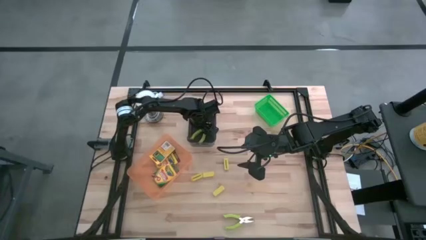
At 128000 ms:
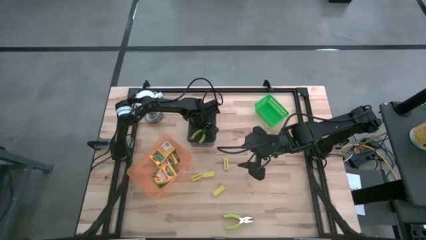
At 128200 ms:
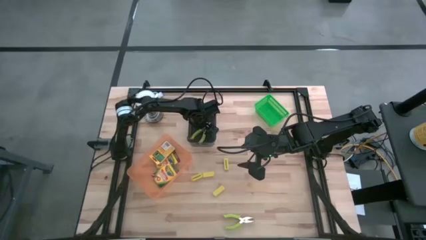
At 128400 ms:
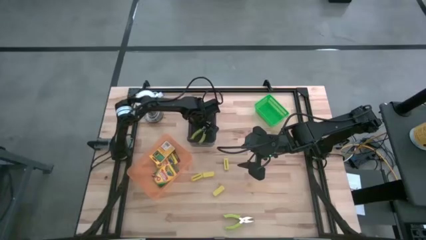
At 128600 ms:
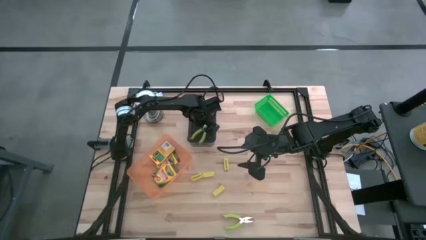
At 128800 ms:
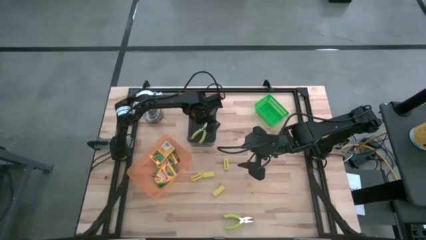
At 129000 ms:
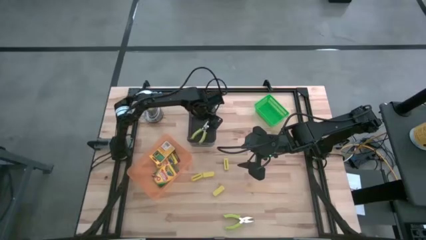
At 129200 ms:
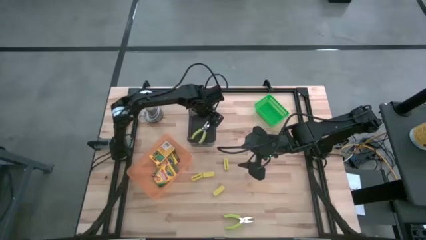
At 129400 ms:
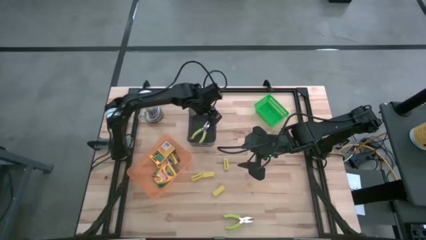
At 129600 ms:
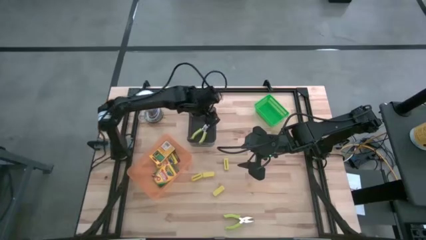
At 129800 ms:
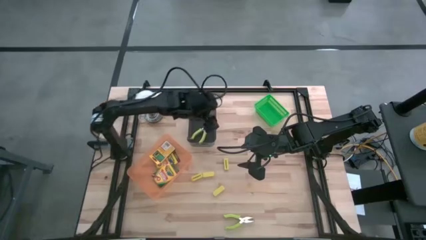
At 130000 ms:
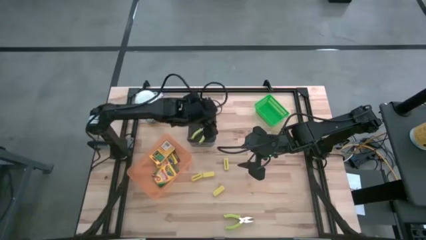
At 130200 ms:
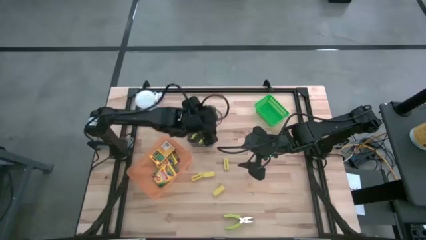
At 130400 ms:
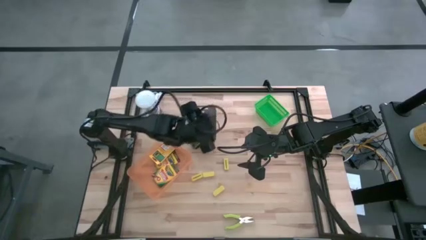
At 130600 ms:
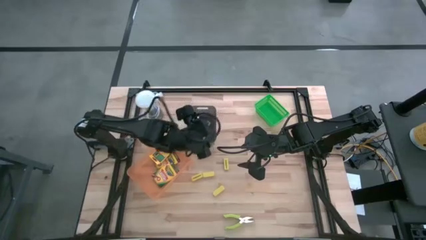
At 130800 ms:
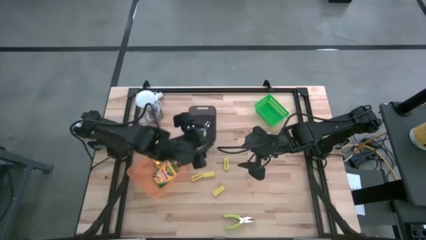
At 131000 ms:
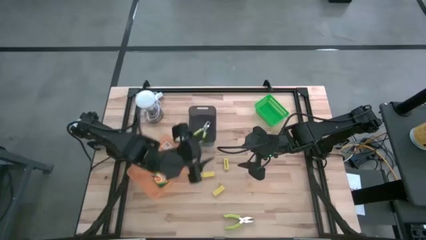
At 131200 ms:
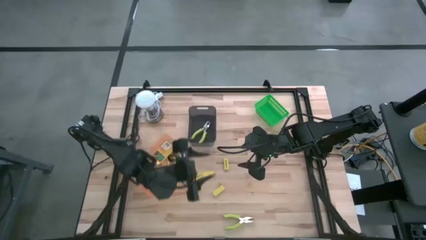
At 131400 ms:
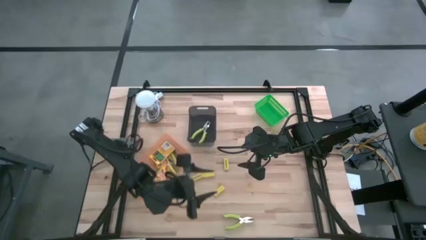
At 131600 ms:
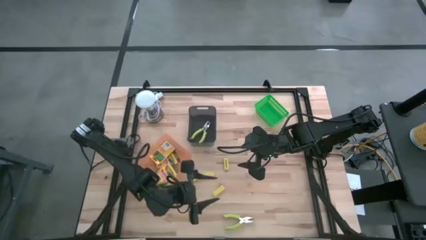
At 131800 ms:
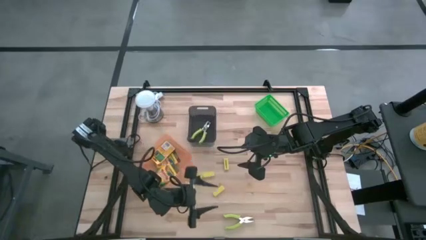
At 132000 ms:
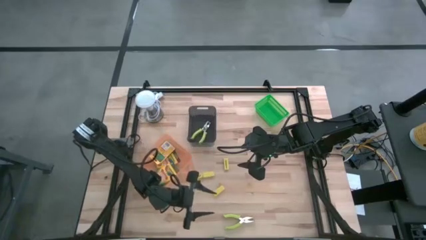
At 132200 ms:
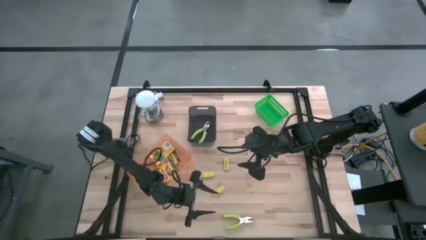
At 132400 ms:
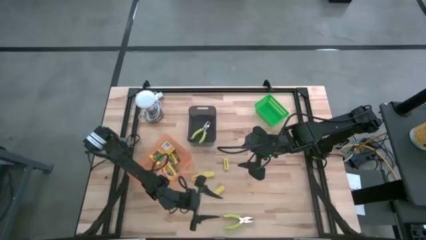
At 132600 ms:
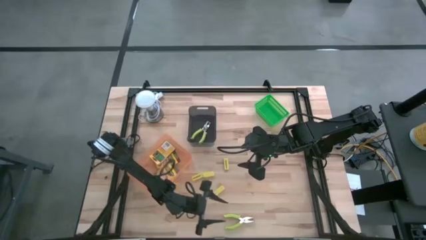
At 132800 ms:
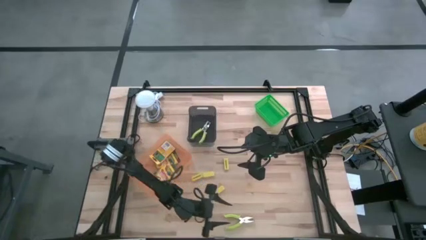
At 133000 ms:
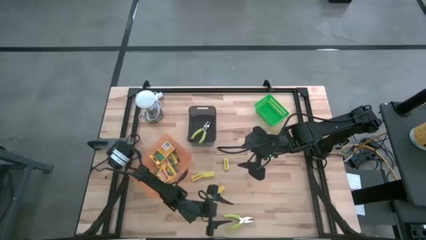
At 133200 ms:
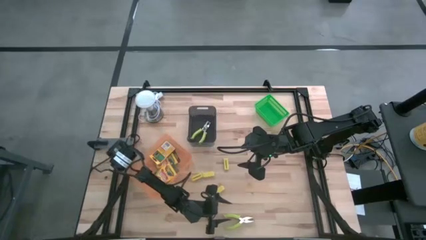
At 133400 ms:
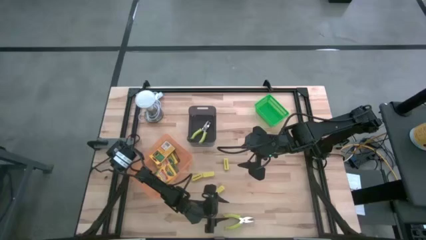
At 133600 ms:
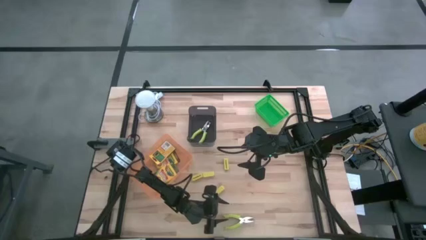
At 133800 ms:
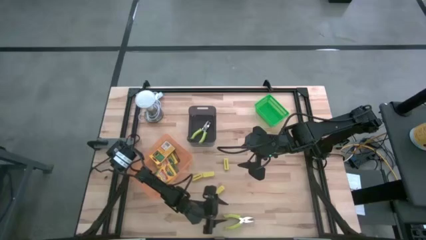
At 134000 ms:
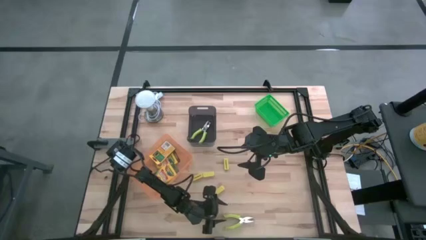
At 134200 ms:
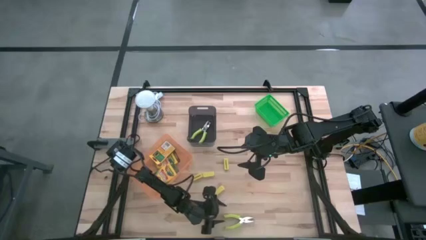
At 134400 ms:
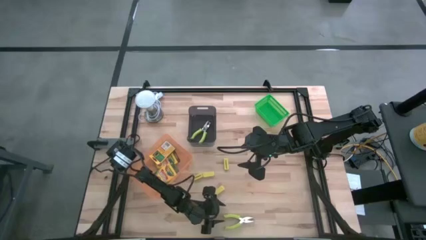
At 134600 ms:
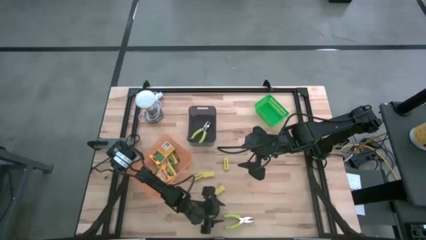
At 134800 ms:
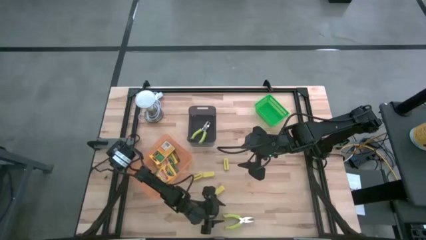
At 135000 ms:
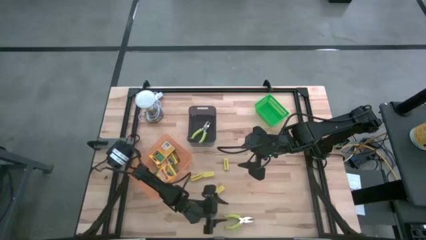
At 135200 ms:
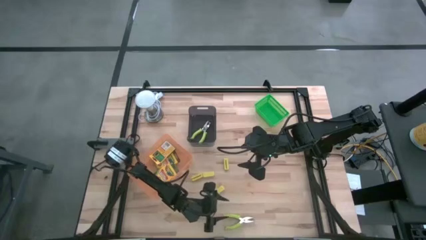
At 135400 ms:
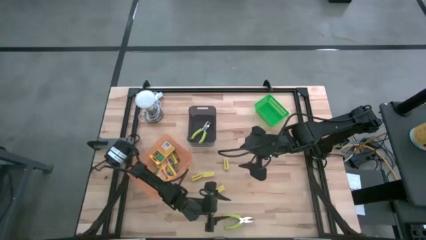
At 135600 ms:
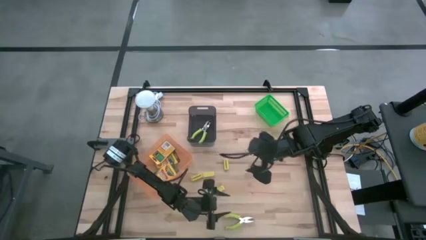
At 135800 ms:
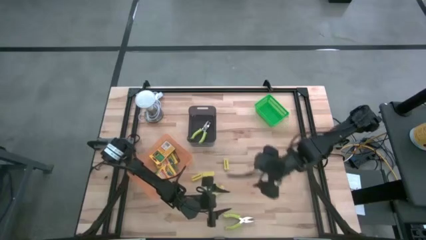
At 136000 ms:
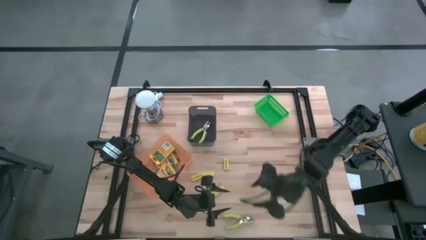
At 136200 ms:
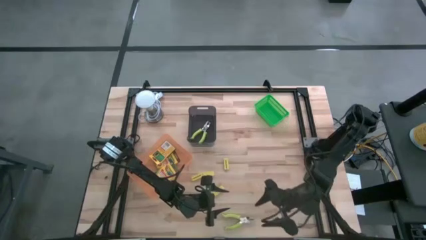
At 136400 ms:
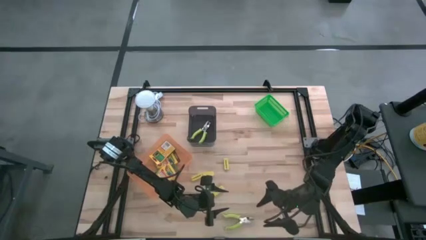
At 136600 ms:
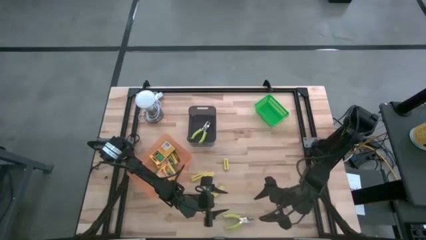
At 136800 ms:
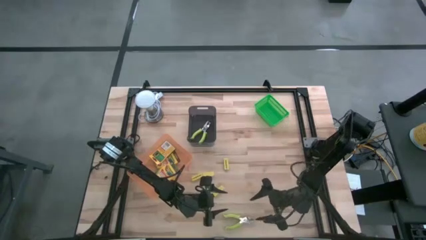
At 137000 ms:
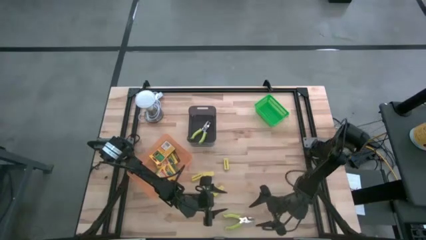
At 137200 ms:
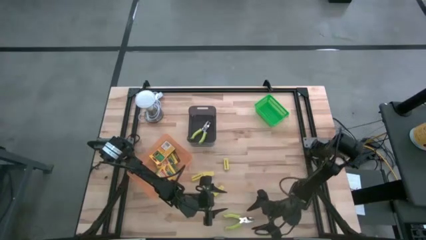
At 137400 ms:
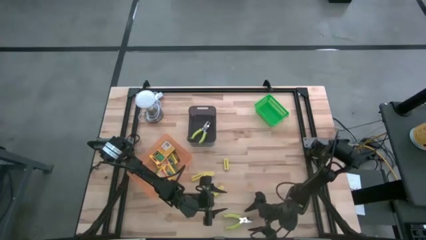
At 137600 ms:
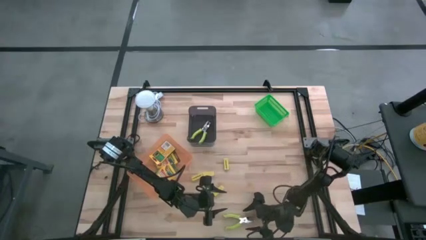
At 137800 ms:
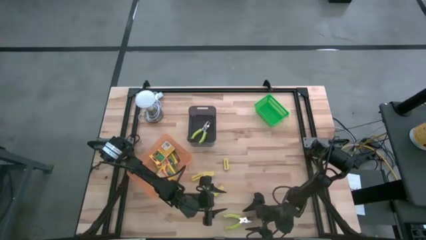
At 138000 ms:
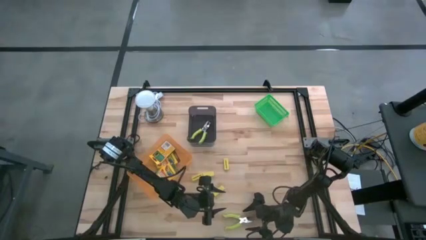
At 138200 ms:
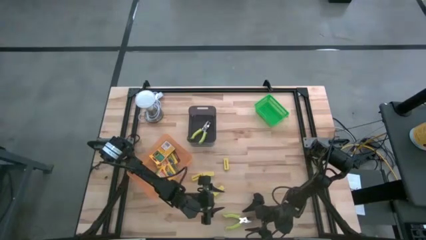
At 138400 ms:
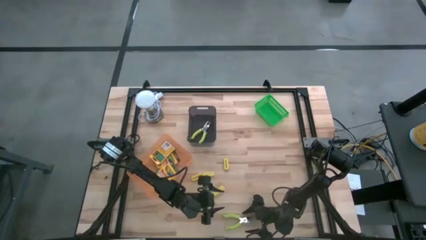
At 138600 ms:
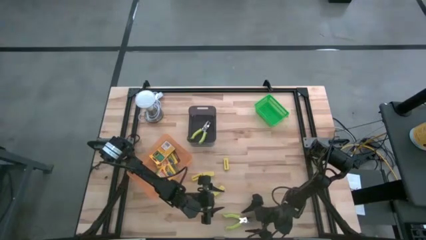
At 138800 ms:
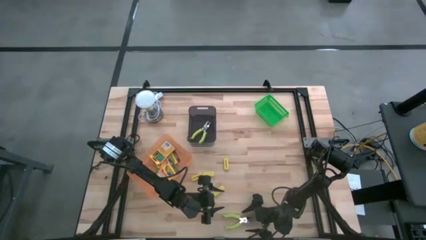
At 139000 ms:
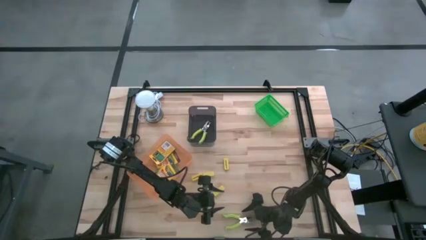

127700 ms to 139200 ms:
Task: Pick & Place School Supplies
Put the green punch plier into the black bin
